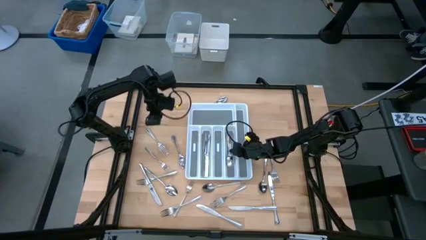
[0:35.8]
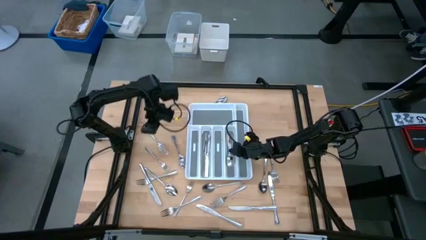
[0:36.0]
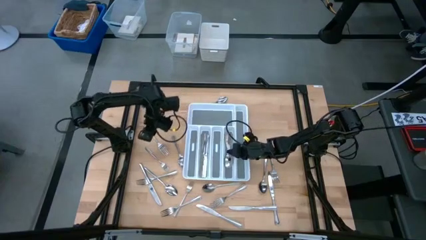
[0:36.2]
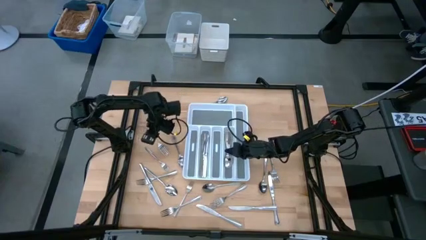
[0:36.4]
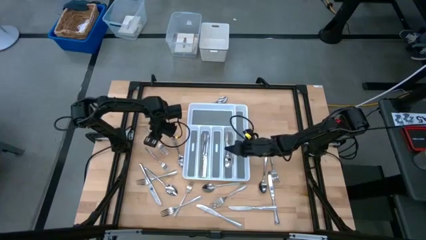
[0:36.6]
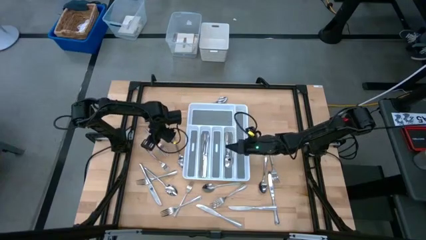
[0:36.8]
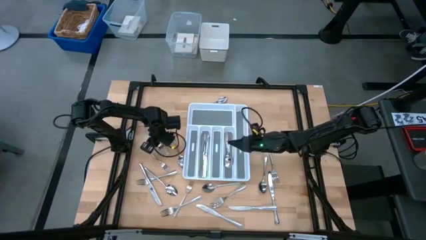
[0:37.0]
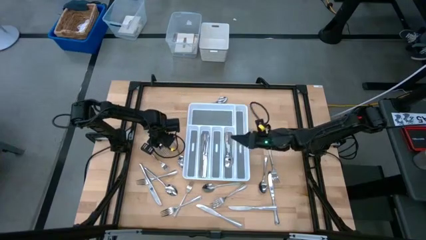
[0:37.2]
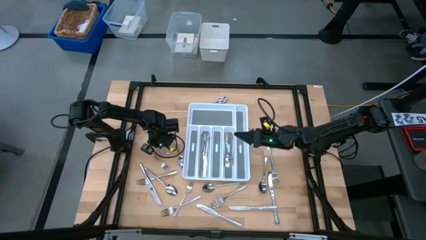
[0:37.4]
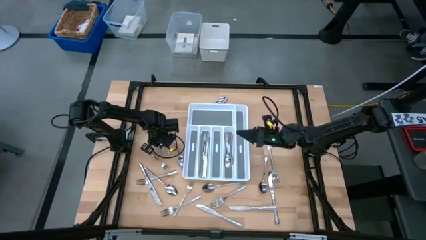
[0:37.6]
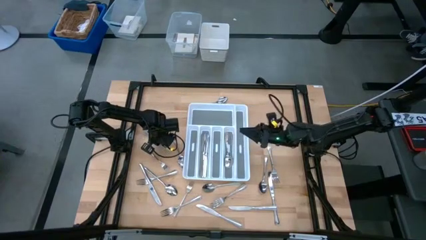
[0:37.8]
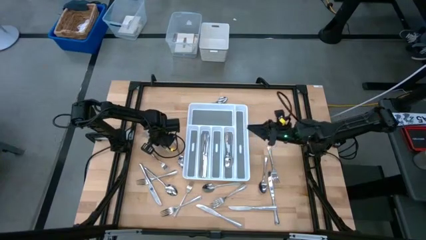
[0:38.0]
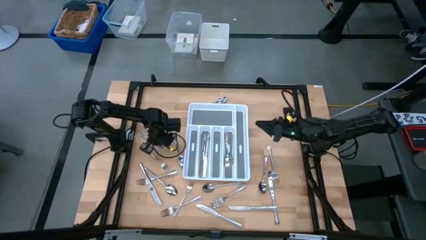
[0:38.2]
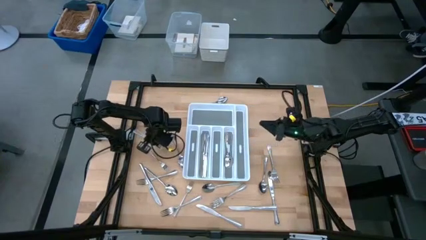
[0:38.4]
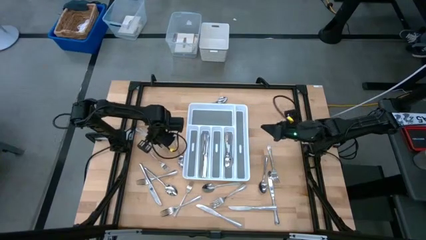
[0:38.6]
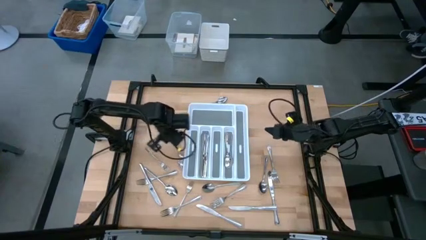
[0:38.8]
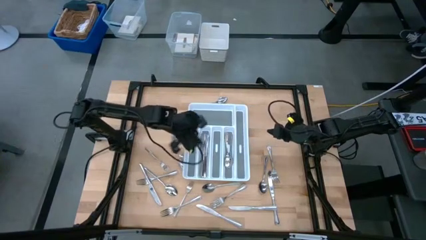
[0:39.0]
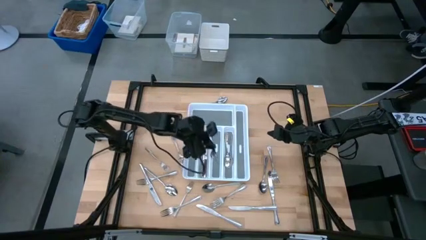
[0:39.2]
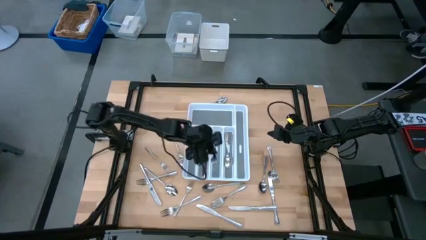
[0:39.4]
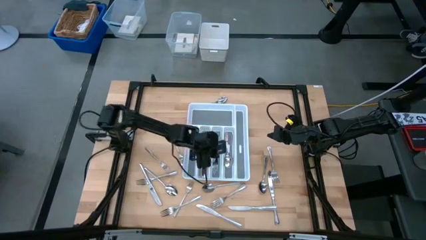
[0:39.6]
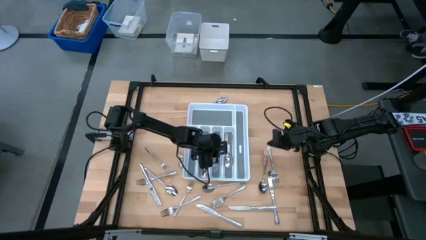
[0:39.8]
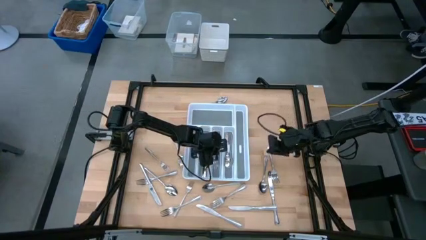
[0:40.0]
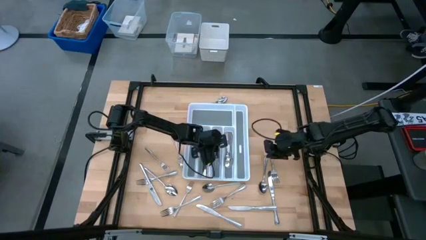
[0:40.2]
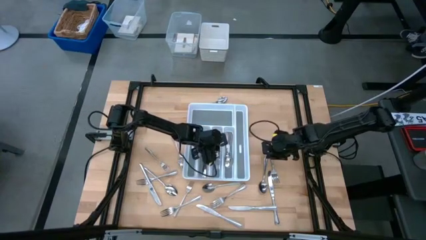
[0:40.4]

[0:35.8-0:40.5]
Task: Sort silverware
Put the silver fork into the white cutlery tray

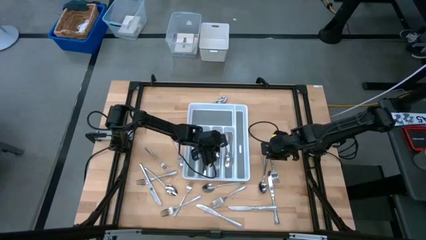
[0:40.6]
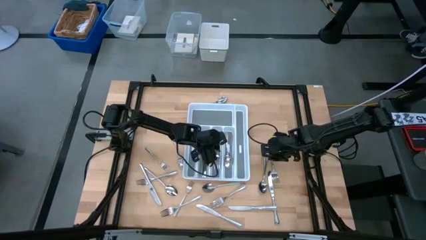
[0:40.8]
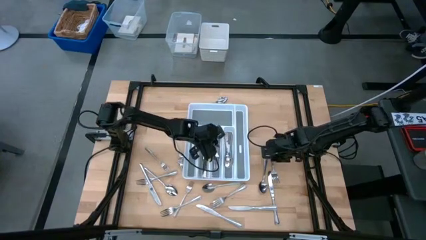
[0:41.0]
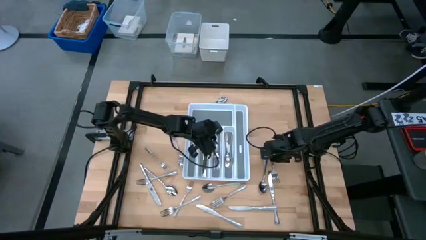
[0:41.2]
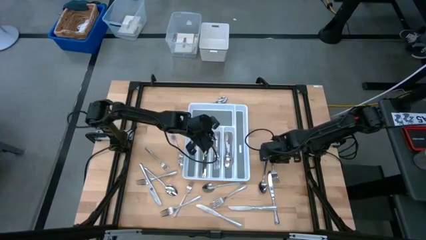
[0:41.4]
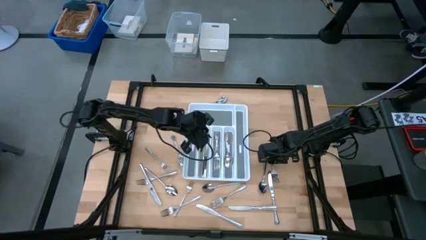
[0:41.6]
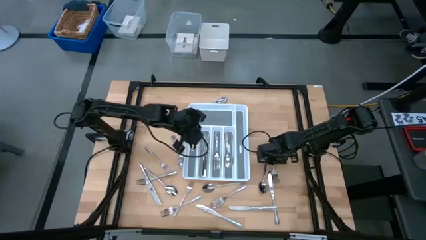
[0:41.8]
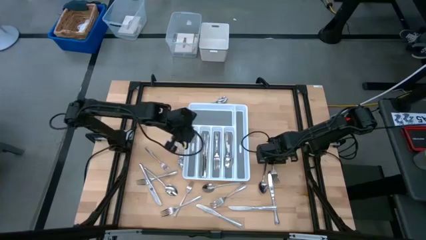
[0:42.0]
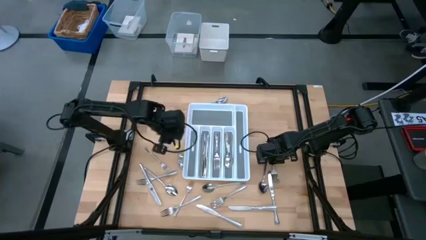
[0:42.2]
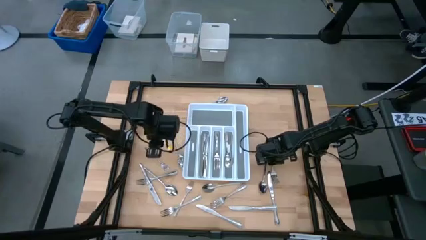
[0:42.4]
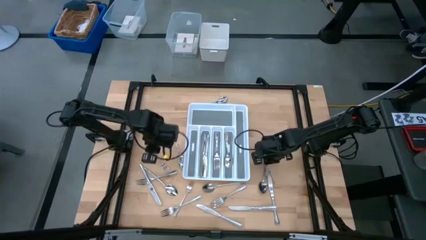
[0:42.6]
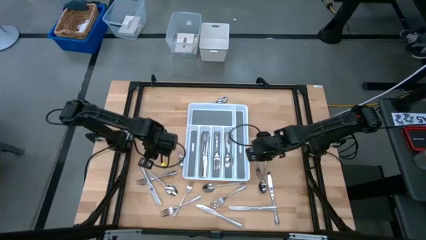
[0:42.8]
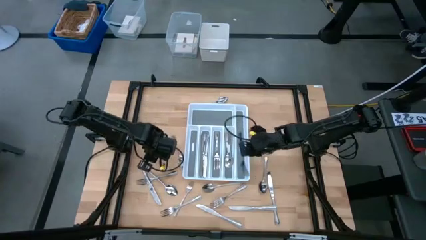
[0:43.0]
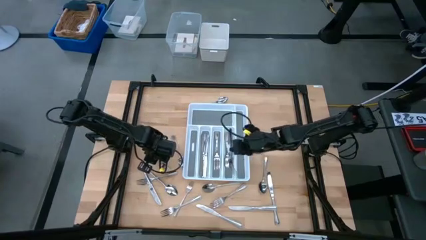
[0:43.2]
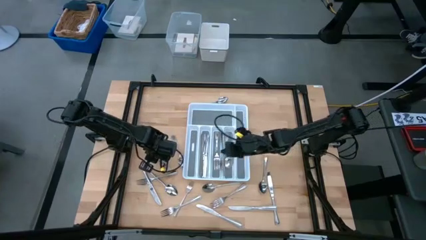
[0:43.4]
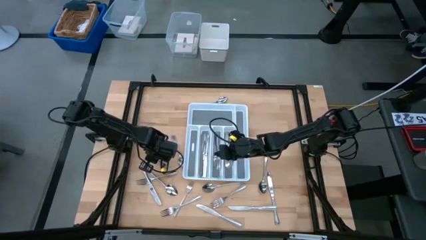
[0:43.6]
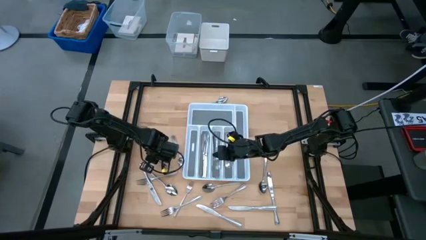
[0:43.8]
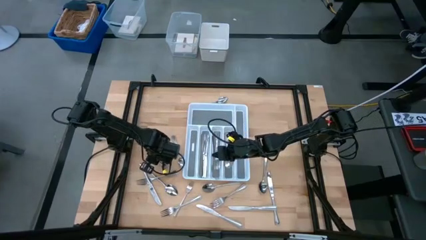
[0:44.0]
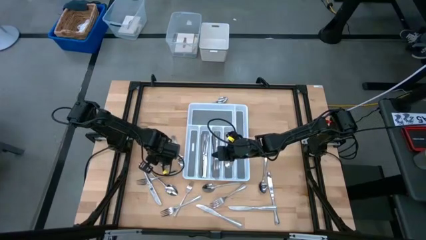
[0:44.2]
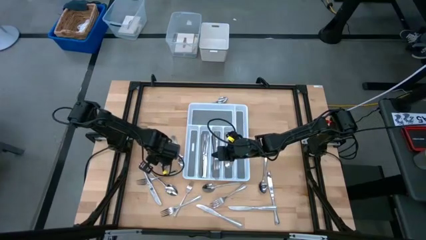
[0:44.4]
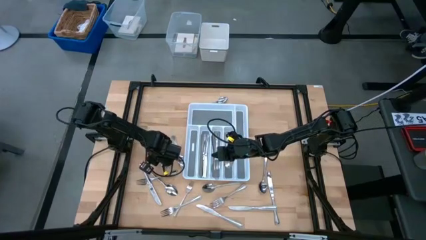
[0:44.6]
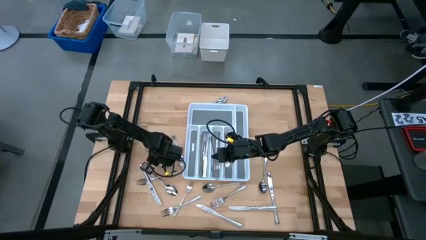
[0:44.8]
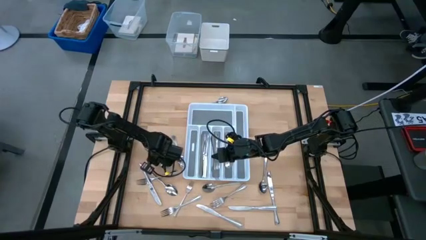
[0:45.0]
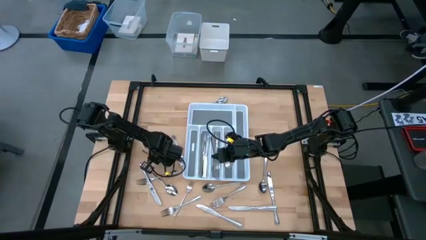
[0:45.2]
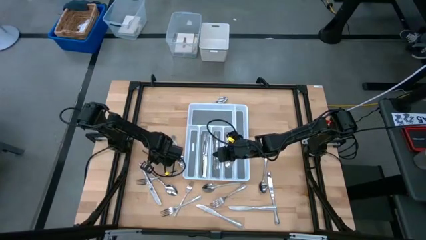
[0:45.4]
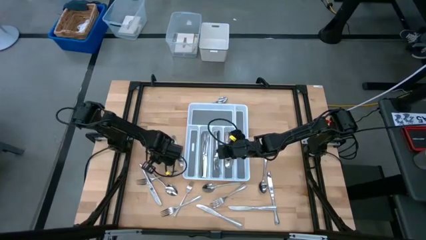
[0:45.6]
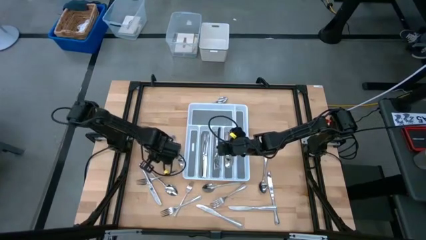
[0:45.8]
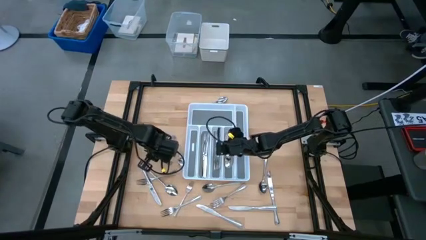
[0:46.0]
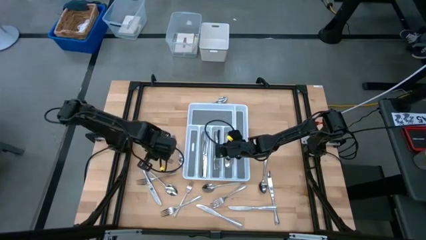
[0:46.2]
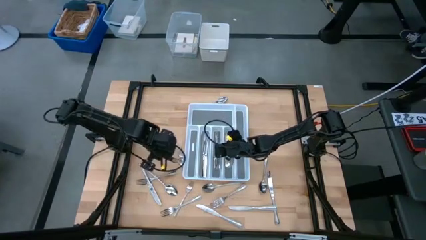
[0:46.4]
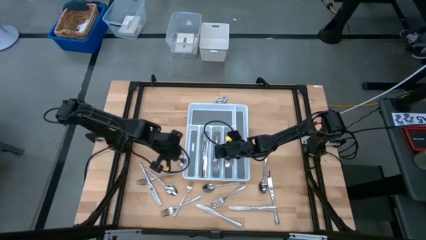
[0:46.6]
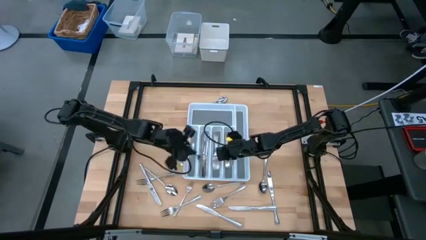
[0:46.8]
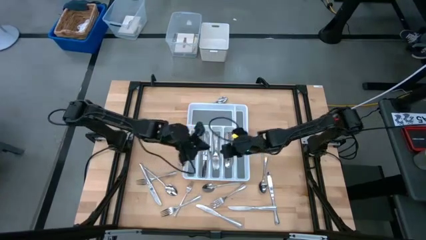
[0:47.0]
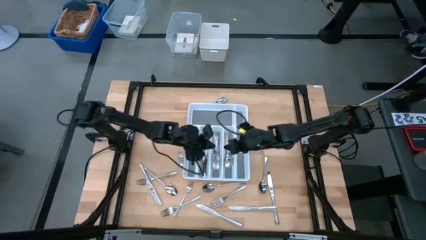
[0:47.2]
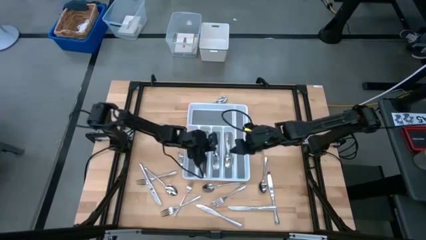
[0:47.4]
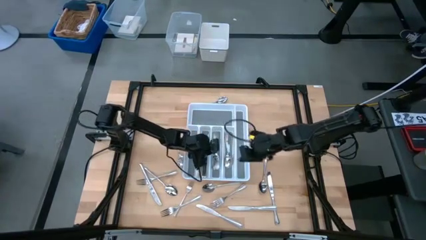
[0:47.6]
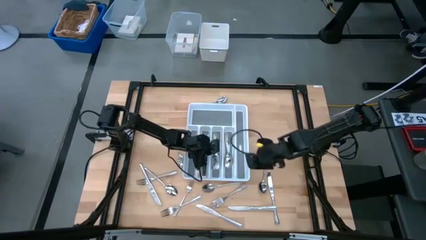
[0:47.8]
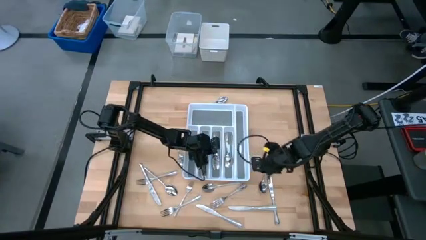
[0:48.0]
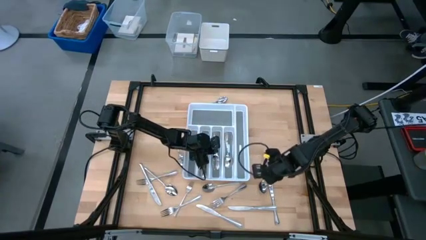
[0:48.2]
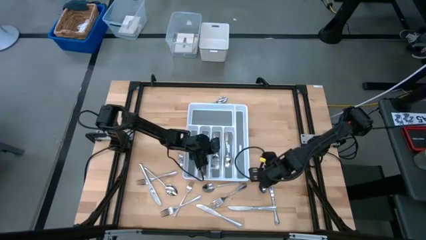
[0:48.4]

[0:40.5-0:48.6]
Put the silver fork into the white cutlery tray

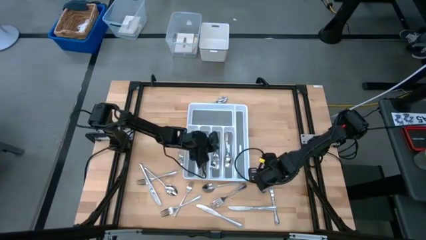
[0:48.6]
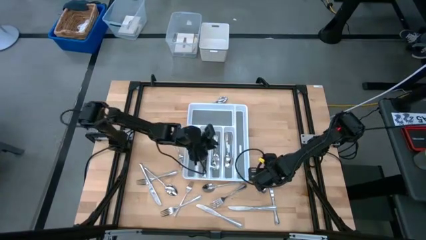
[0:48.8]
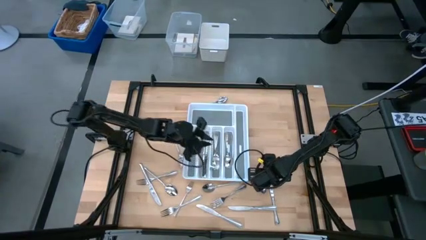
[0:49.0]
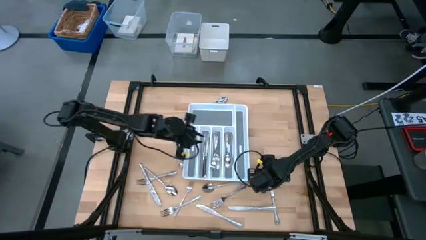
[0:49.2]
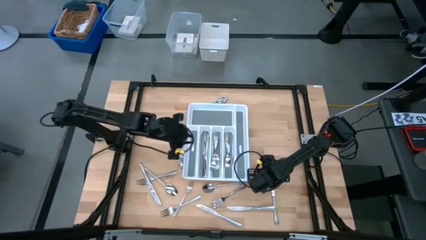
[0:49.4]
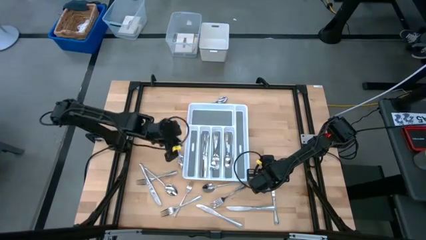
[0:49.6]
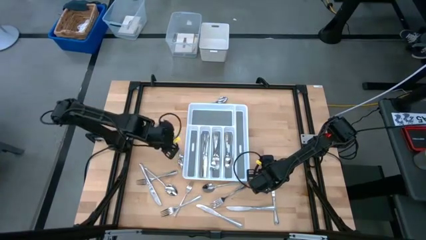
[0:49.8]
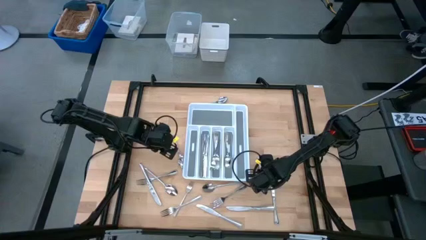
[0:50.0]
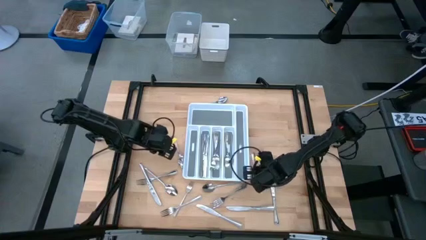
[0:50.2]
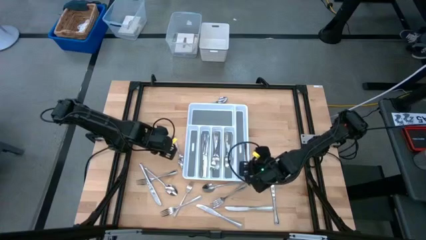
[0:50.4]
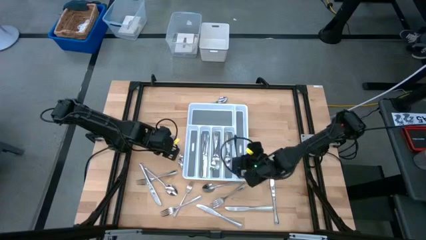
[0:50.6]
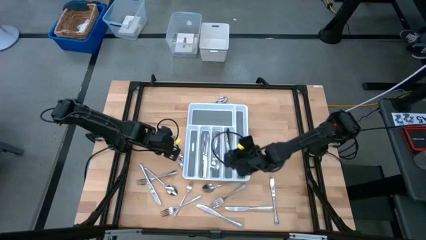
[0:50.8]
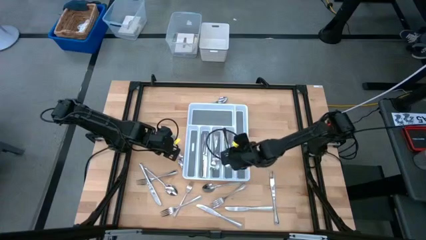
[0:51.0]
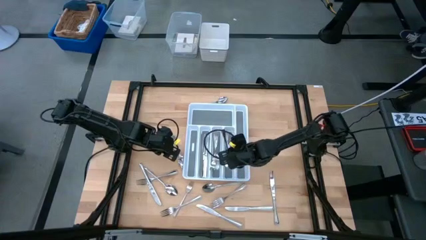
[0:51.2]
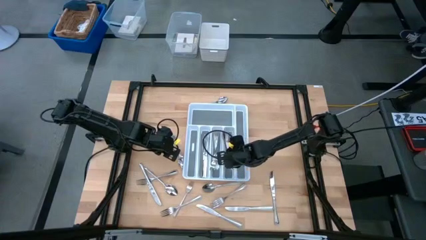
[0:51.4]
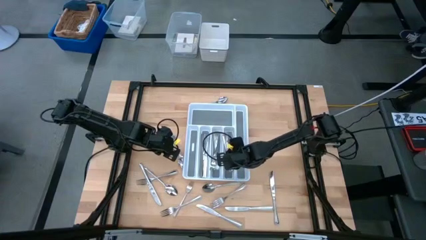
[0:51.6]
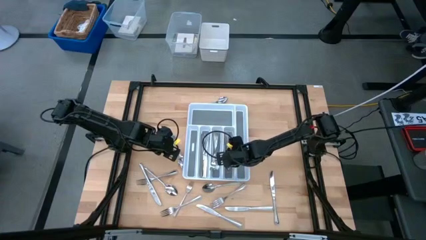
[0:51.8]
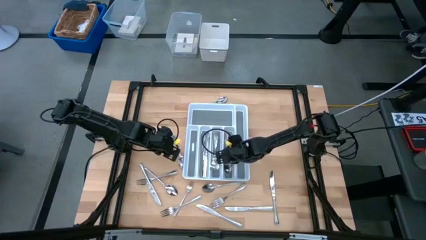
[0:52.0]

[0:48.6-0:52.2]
Put the silver spoon into the white cutlery tray
